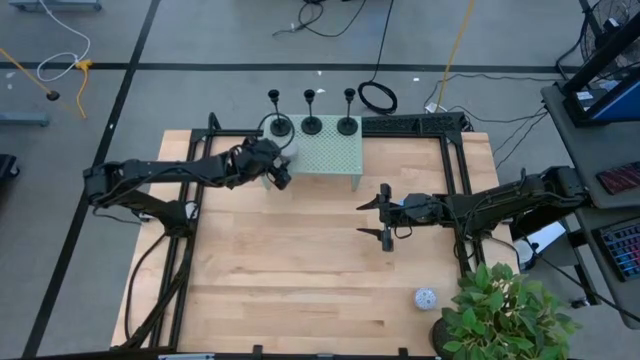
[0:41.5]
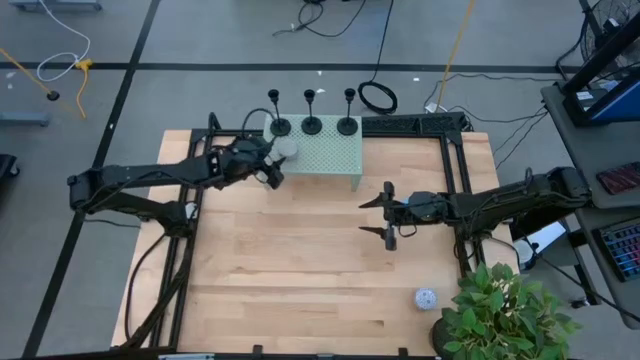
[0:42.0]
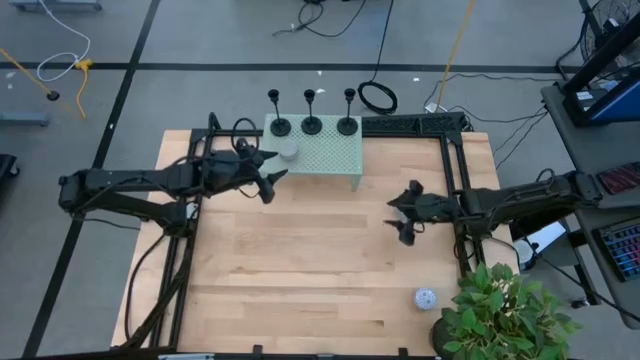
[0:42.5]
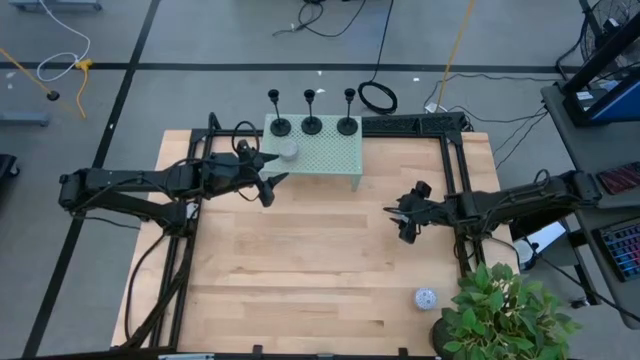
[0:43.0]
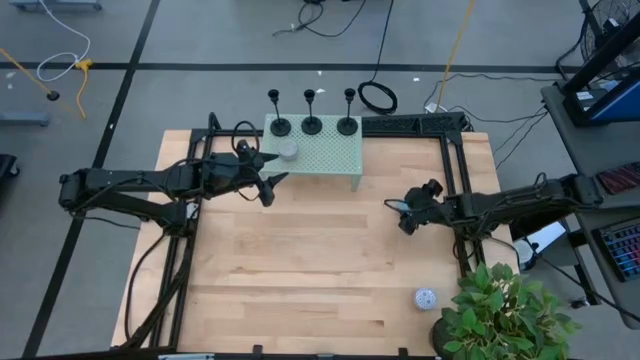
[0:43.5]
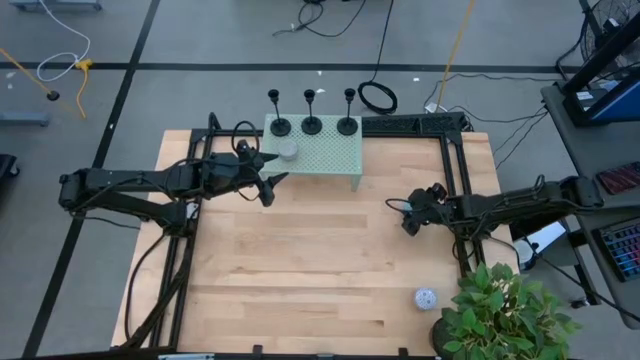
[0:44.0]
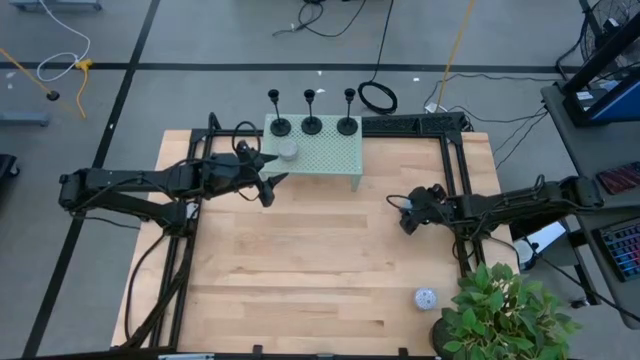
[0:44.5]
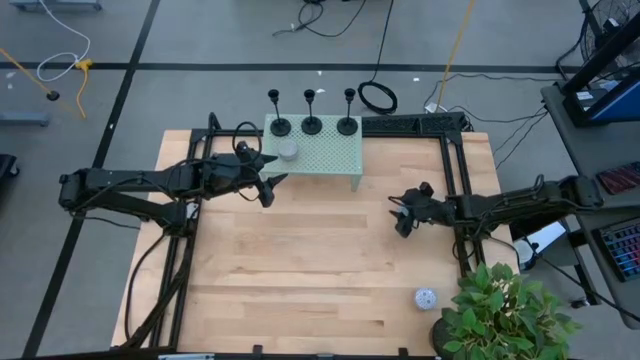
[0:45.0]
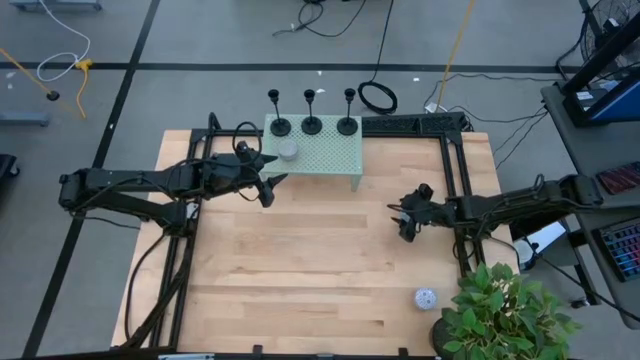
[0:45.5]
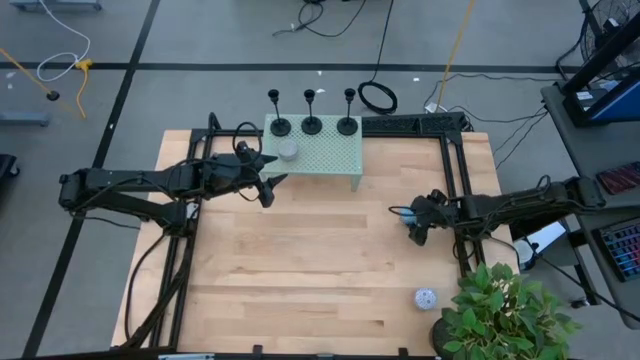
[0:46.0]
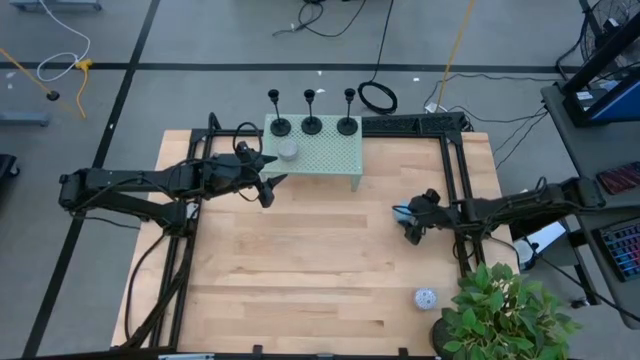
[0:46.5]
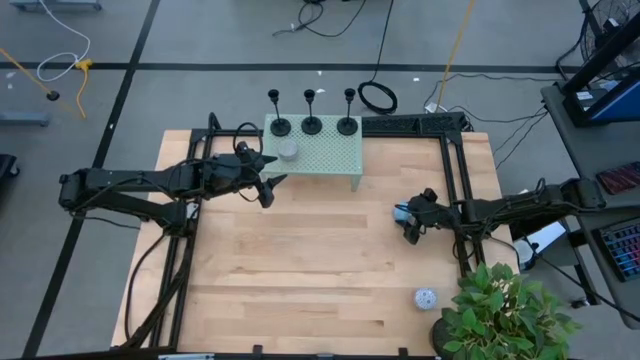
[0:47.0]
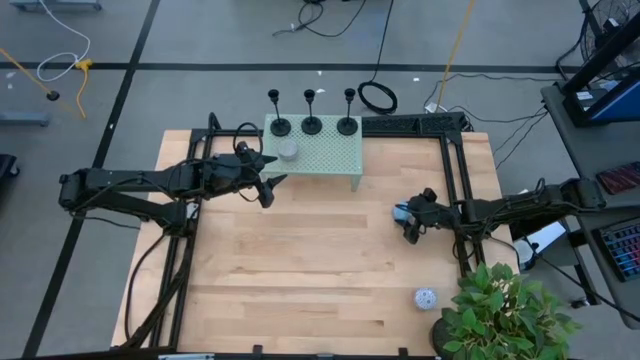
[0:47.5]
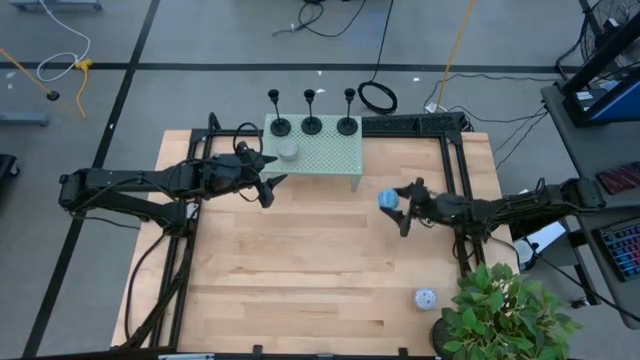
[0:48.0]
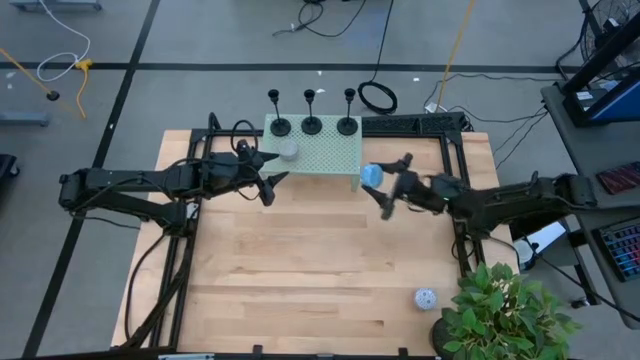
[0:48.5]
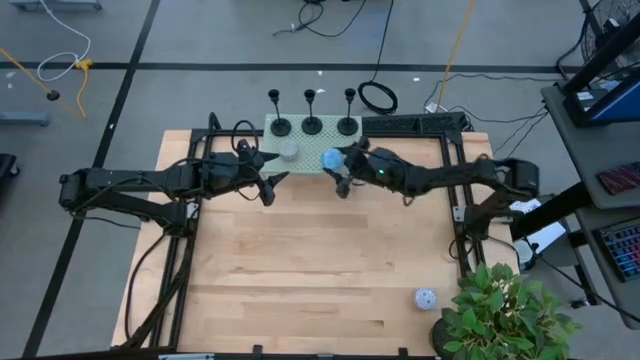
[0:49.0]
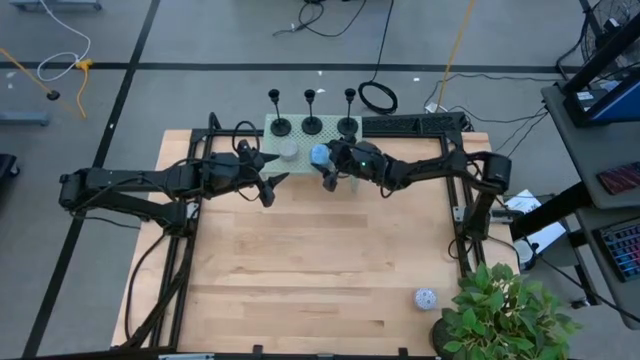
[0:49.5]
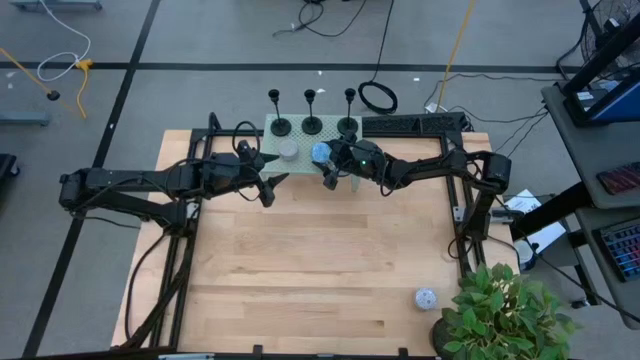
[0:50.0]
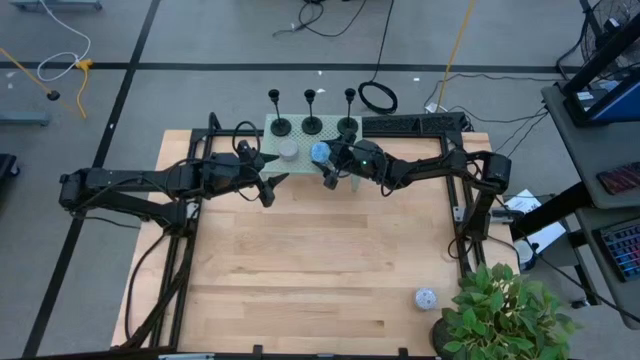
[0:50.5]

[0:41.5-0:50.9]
Task: Pick & Place candle stick holders
Put the blue patterned scented candle on the shelf

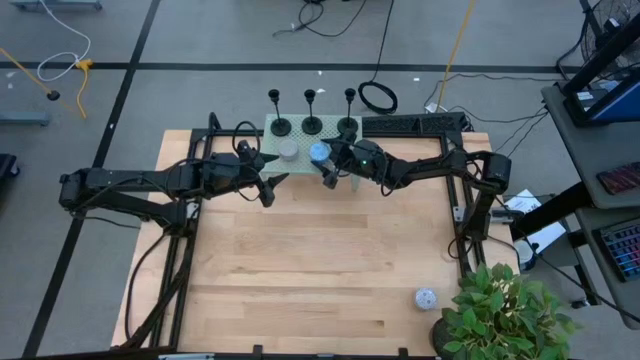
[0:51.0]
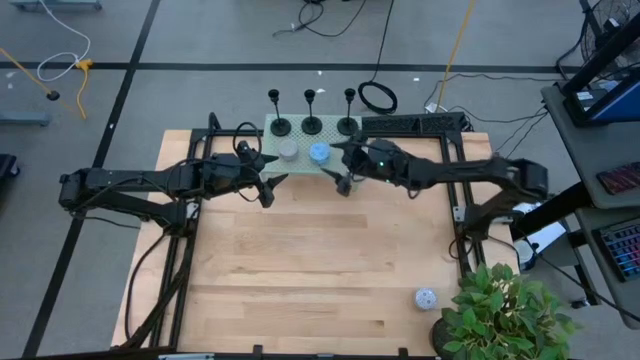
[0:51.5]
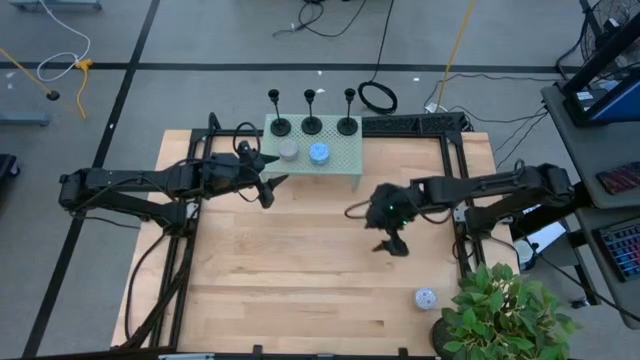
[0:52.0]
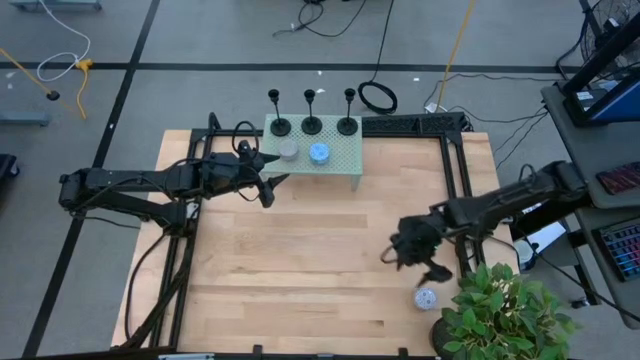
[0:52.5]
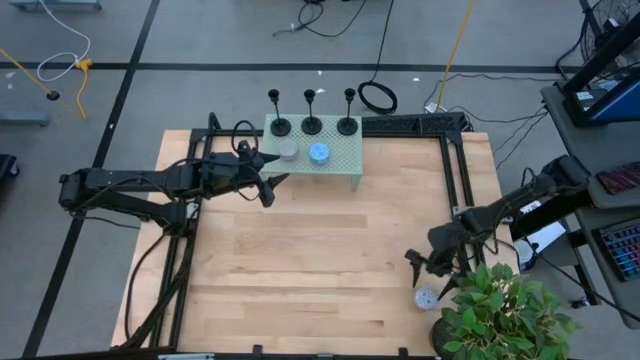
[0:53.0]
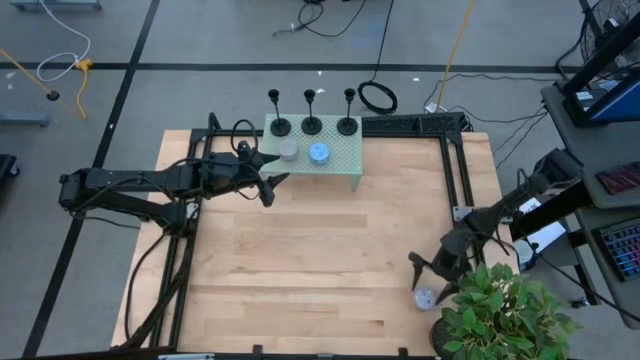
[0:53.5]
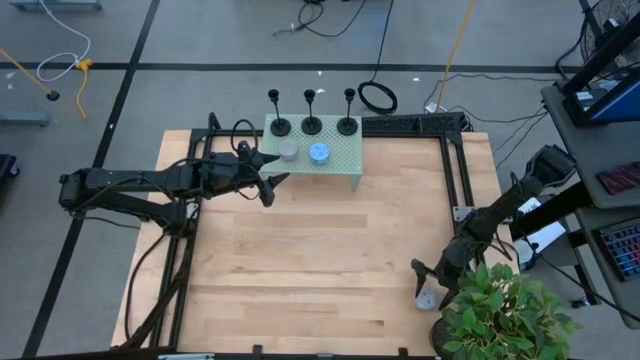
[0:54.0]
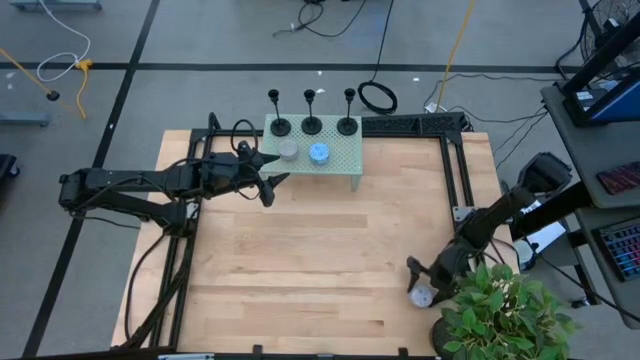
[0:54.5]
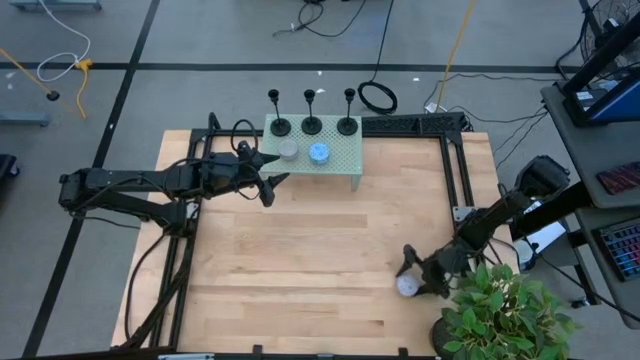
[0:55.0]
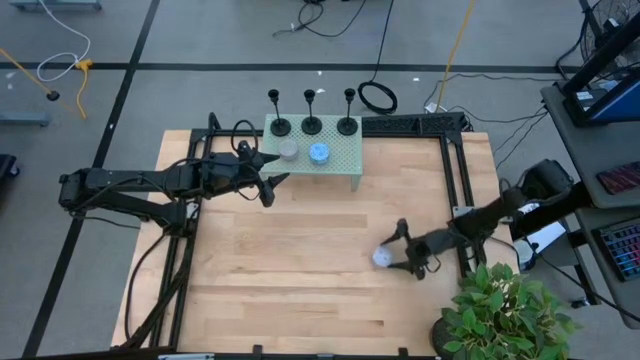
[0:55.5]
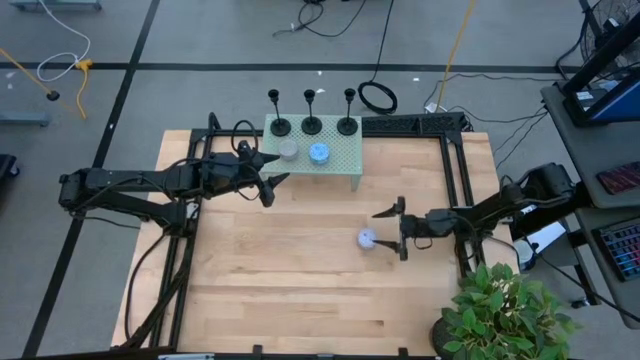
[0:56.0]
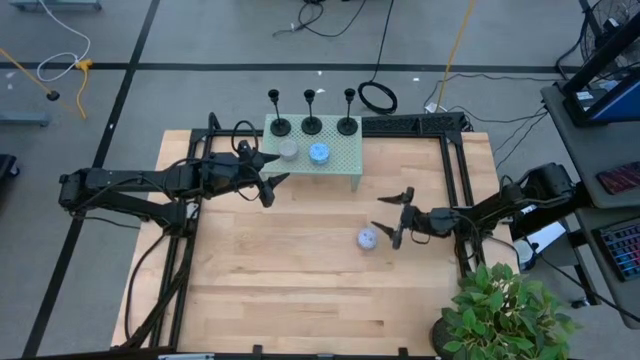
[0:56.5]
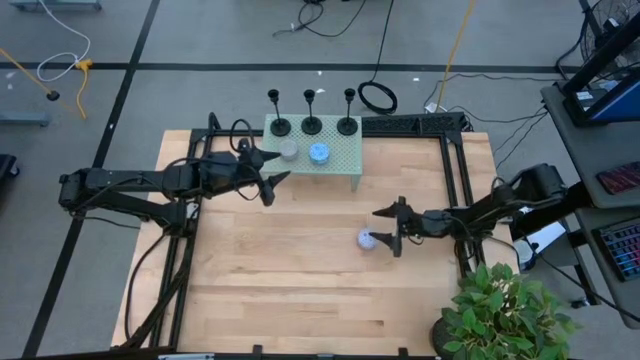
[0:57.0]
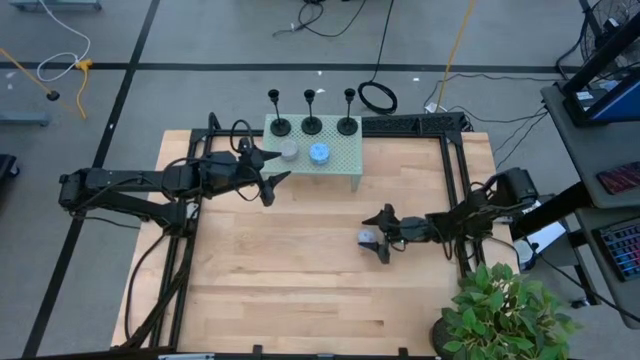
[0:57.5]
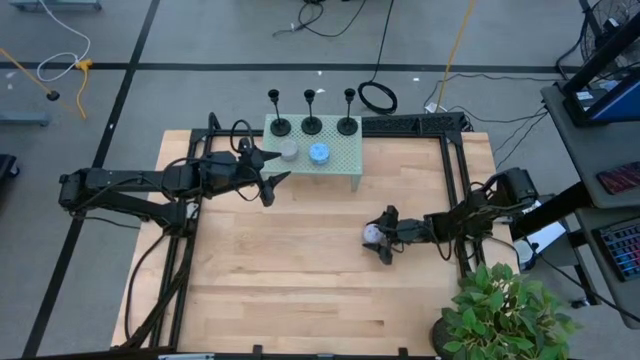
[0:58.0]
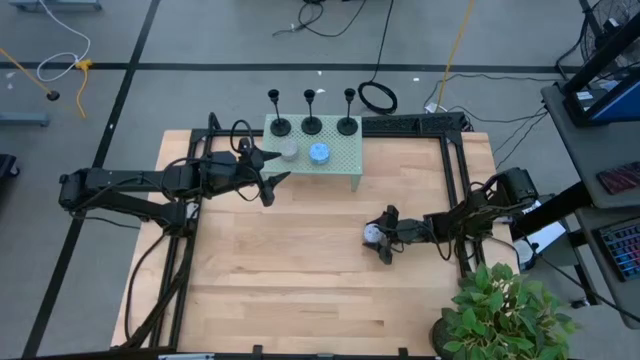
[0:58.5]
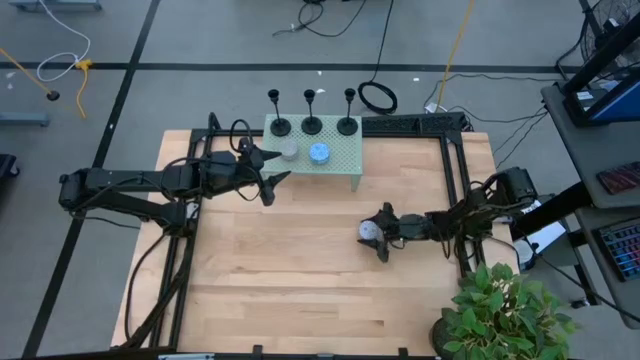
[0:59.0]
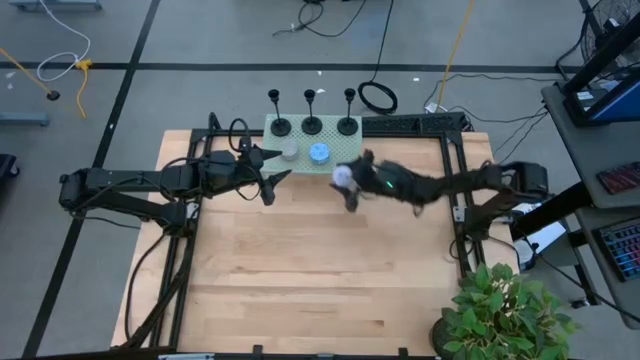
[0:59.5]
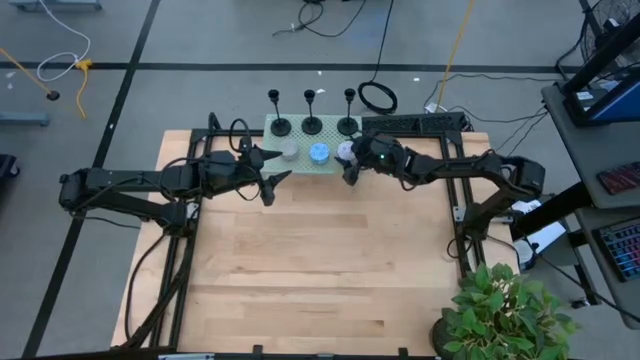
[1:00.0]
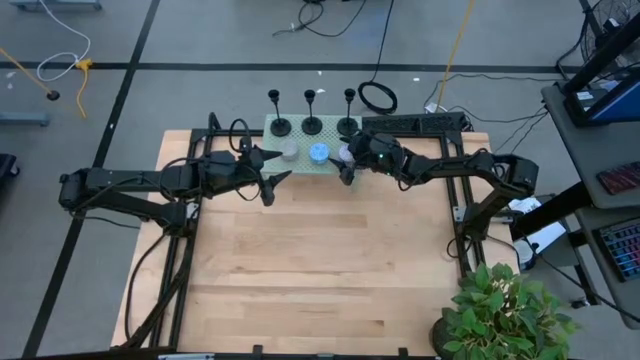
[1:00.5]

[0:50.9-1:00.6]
Put the white patterned scented candle on the shelf
